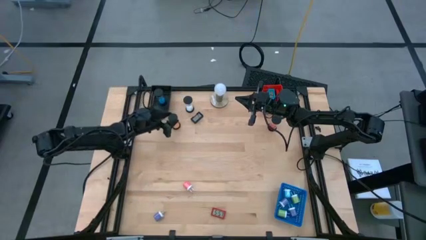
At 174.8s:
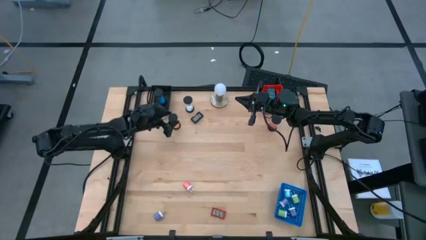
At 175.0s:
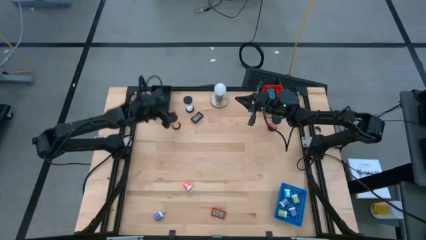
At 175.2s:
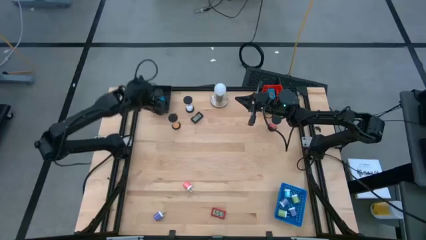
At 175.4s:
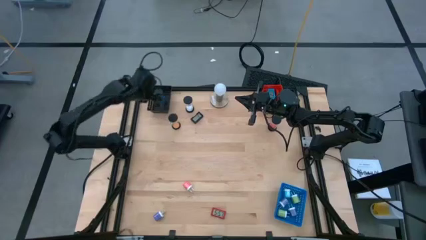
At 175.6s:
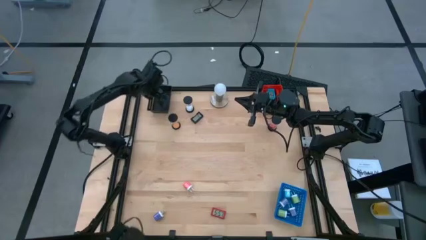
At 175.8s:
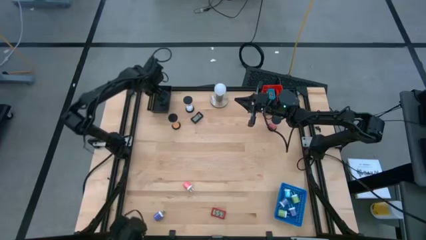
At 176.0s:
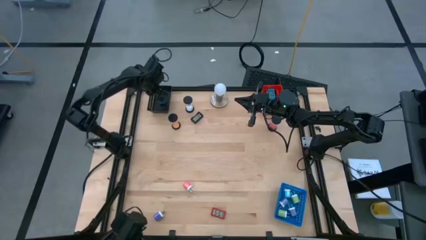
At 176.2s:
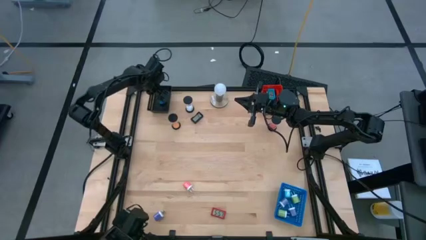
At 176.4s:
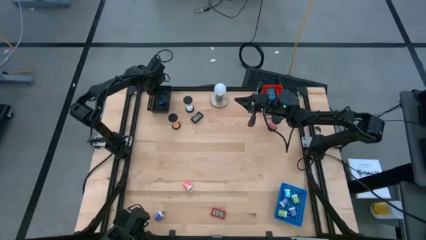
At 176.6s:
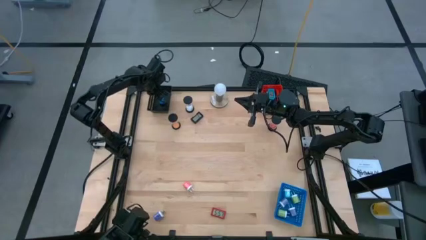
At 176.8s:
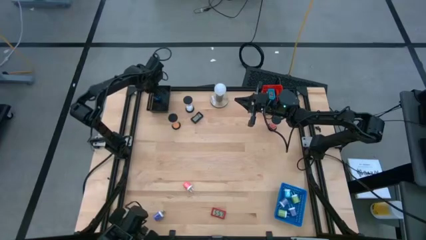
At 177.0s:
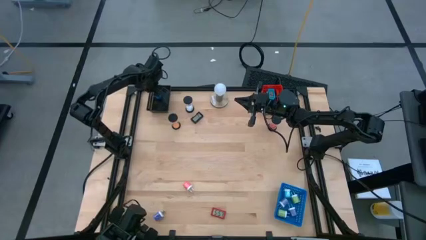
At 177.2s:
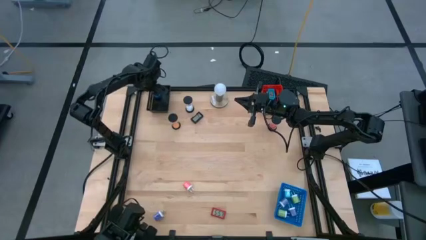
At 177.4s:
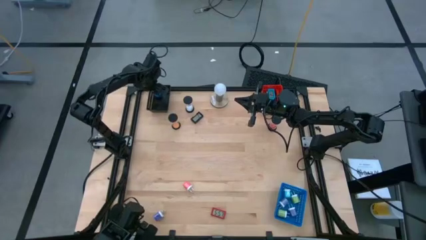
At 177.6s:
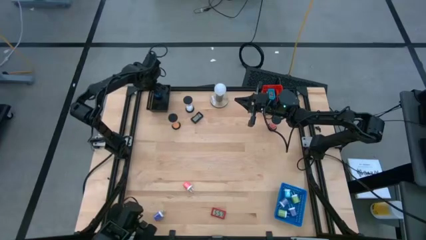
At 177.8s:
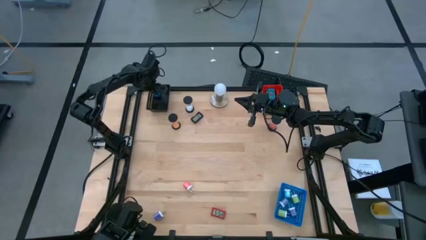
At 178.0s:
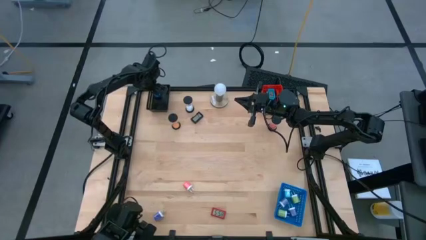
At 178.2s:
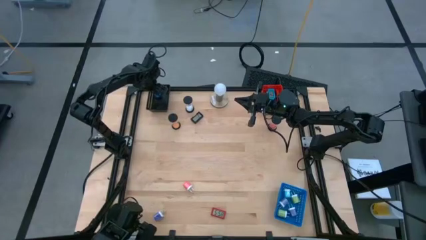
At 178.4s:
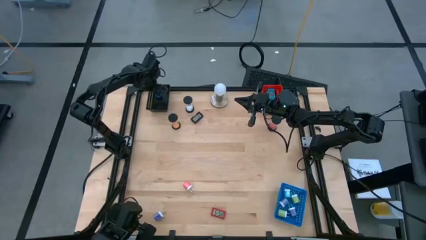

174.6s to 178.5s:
Task: Pick & Place Office items
Adjust the blue hourglass

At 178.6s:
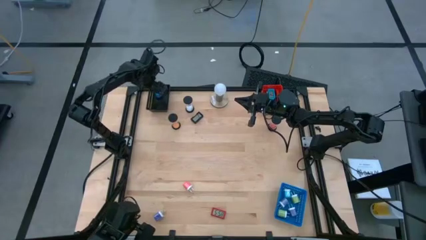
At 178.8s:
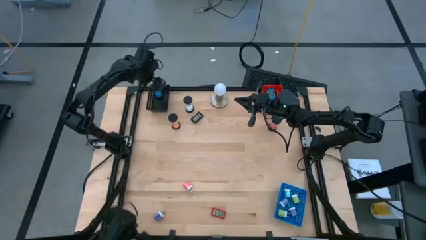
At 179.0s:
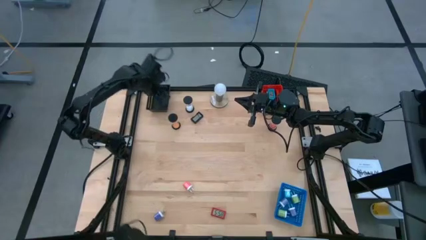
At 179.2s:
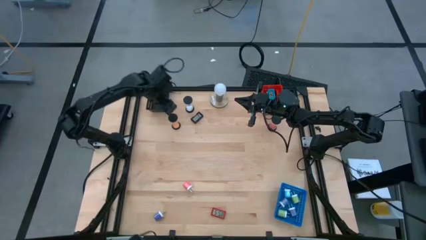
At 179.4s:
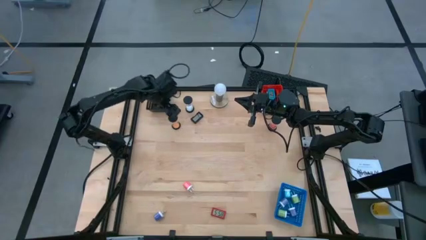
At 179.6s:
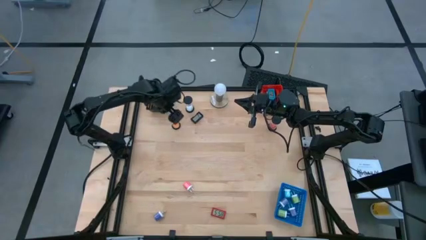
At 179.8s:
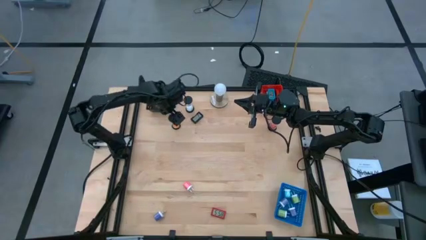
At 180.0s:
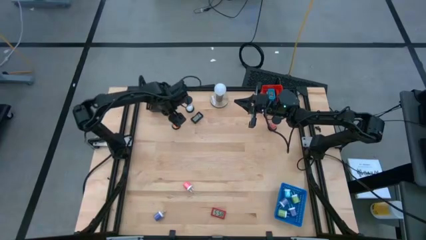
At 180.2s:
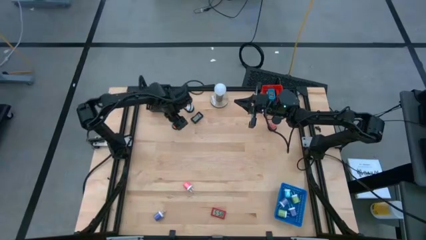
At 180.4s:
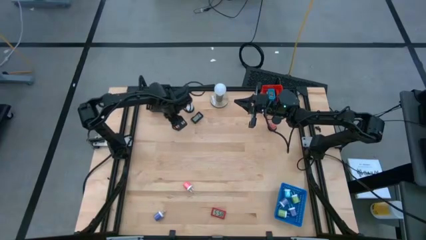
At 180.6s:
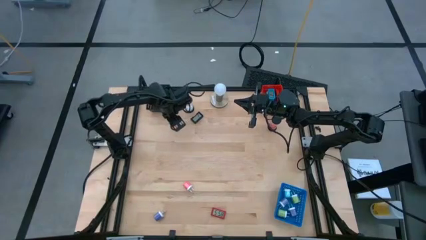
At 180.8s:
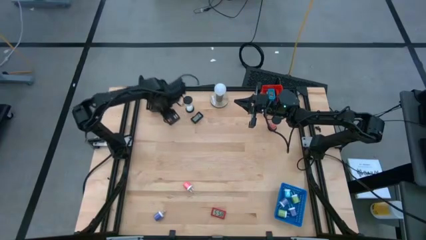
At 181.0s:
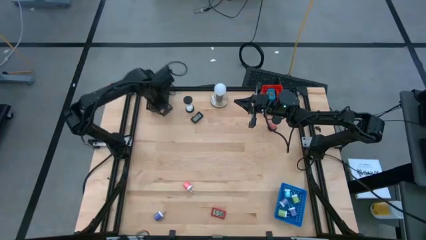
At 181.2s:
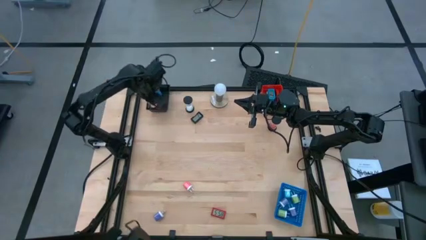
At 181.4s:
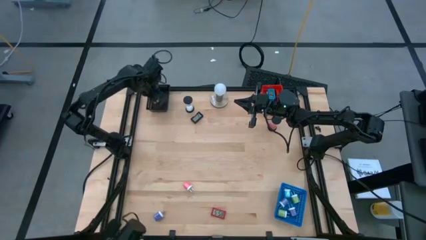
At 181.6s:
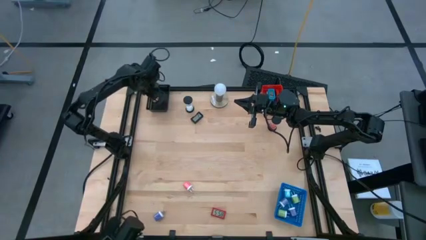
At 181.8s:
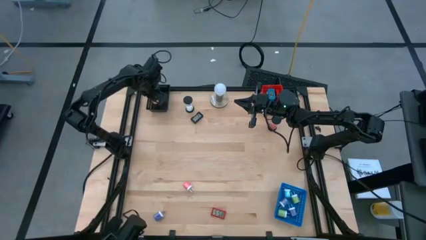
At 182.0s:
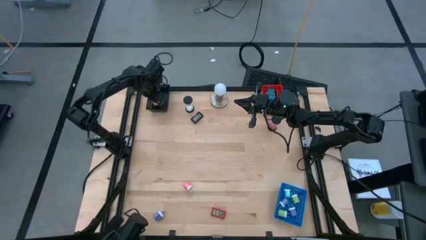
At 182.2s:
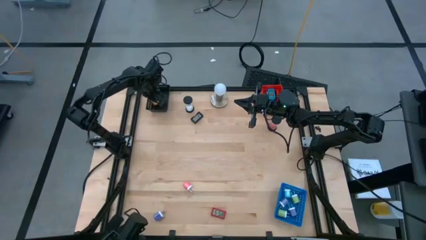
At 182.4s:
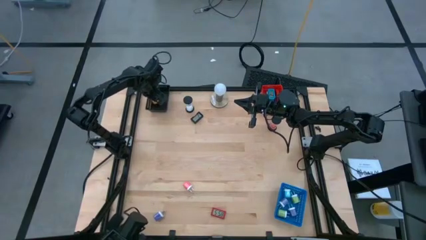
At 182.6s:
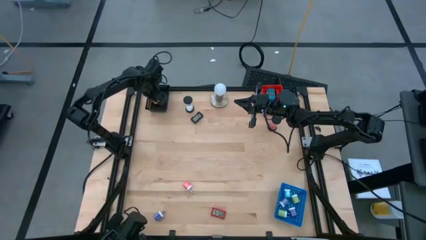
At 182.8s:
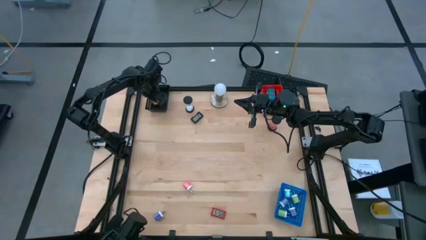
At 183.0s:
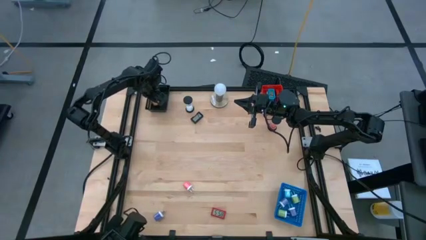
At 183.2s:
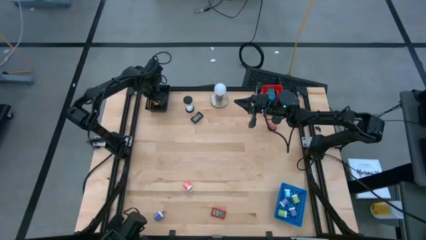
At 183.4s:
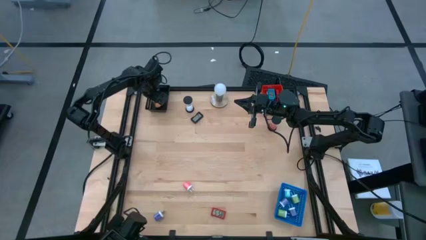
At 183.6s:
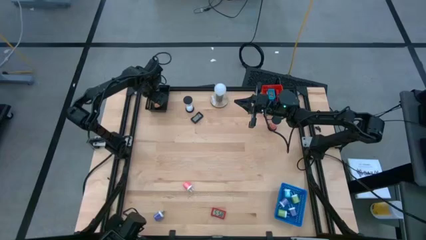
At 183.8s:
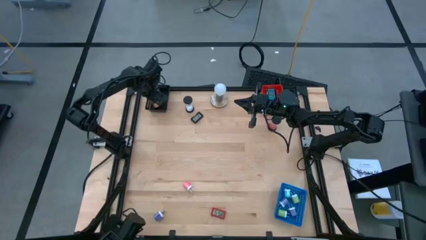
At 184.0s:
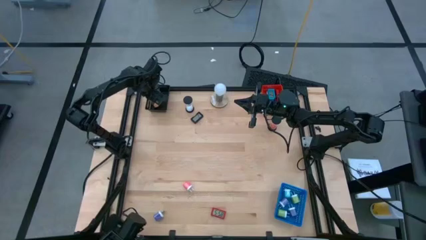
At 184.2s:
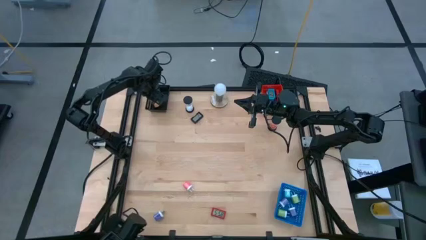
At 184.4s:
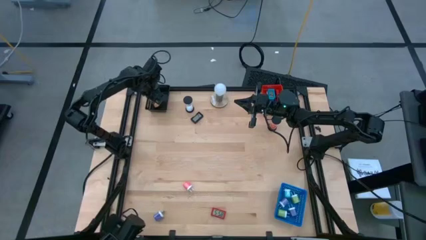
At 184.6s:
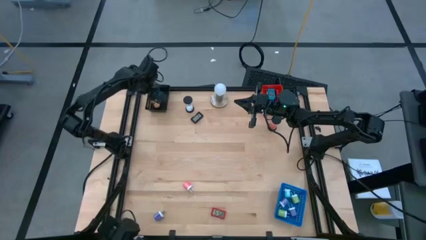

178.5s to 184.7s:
Put the yellow hourglass into the black bin

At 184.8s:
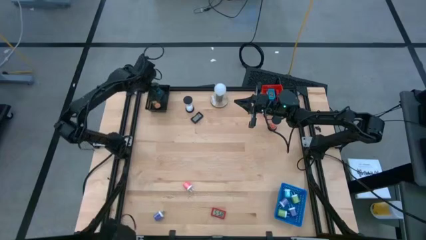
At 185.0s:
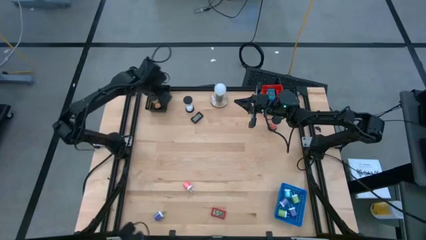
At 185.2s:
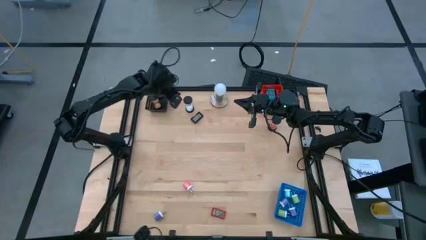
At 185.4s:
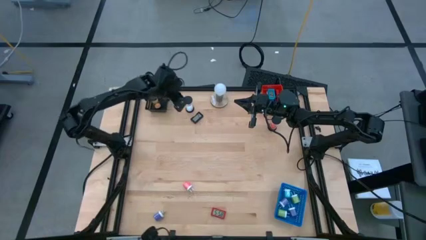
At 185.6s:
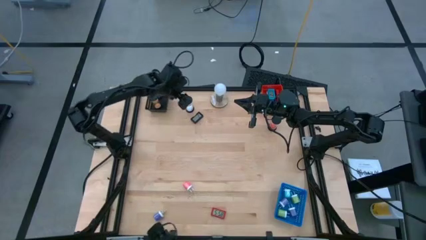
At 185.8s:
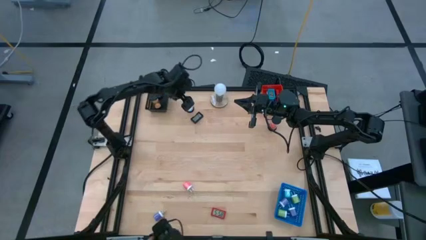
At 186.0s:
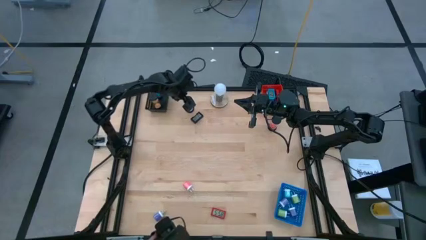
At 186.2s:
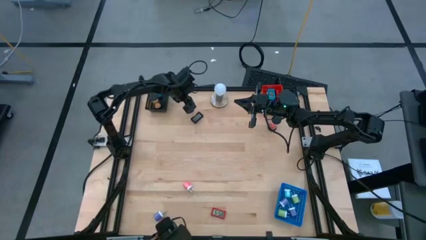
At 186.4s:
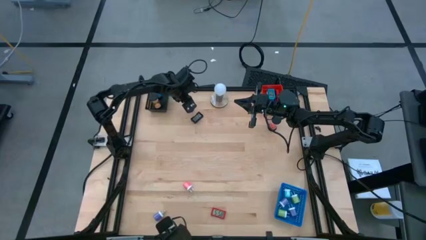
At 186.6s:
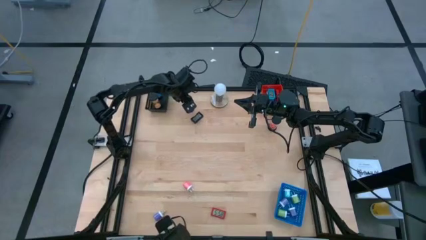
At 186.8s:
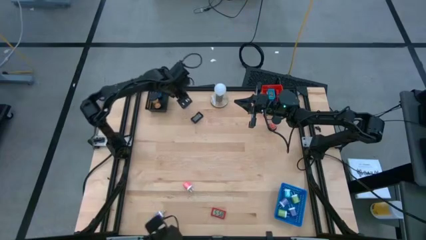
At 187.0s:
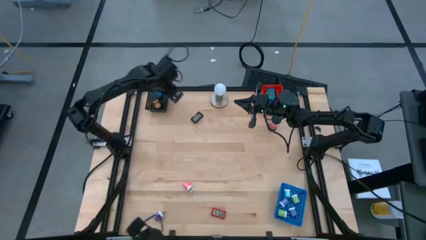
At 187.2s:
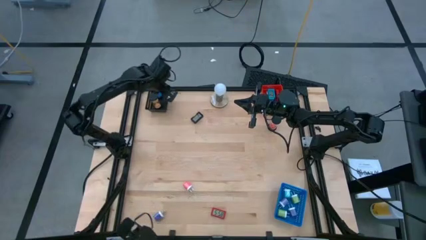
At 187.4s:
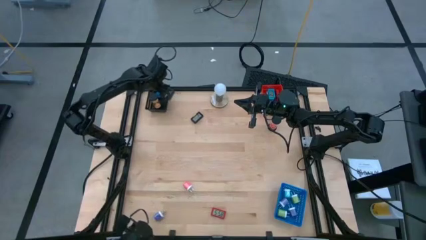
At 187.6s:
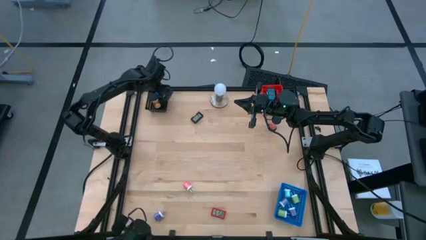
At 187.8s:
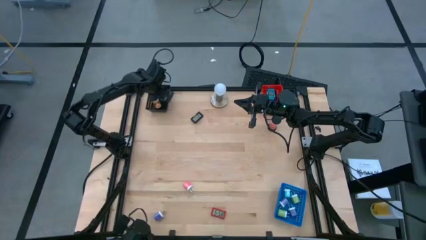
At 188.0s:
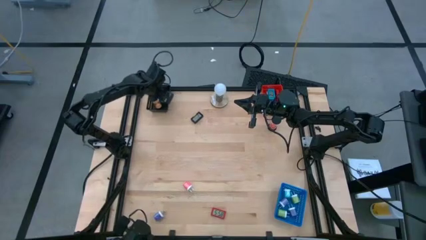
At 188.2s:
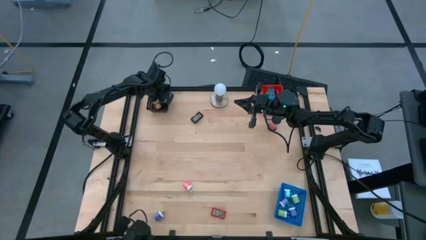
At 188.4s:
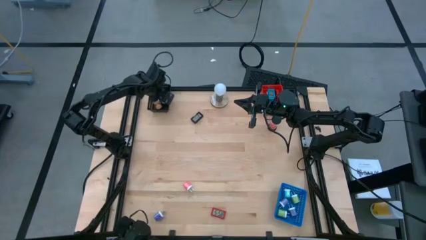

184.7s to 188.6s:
Put the white hourglass into the black bin
